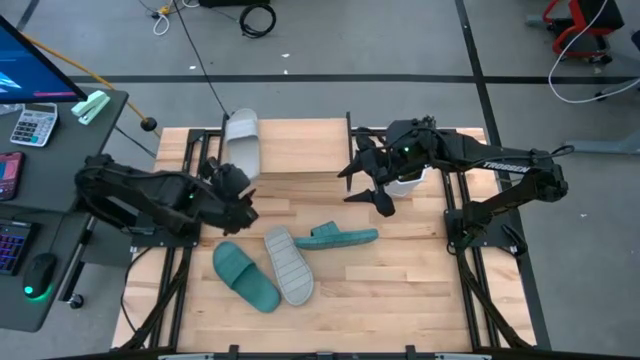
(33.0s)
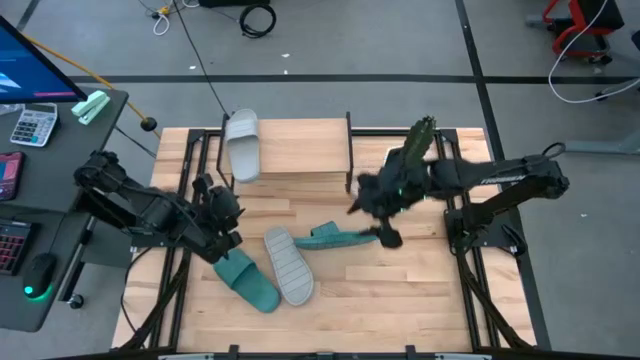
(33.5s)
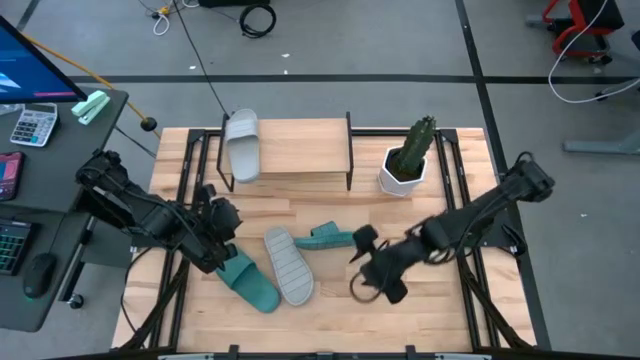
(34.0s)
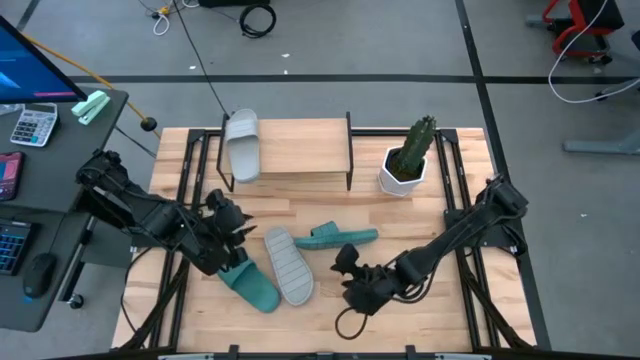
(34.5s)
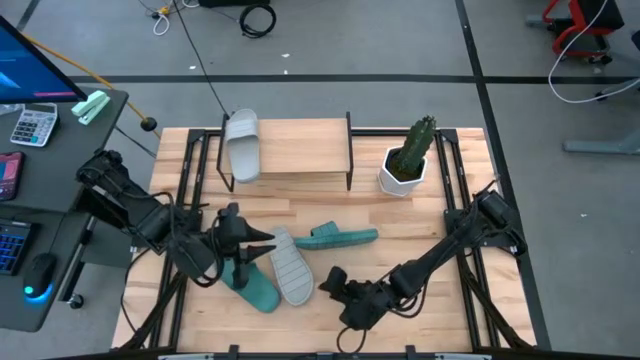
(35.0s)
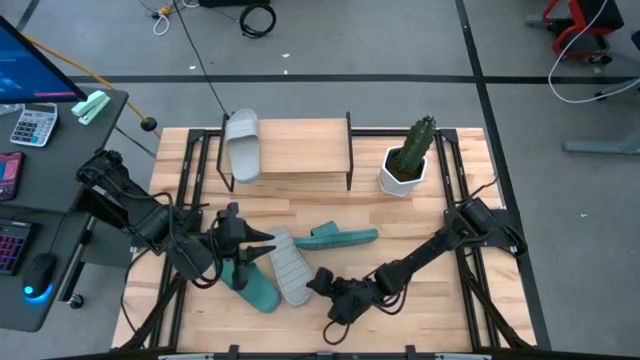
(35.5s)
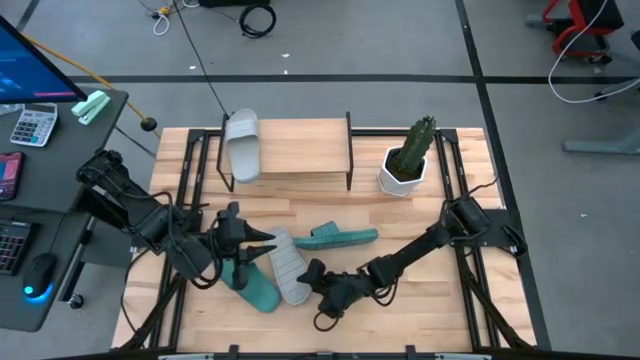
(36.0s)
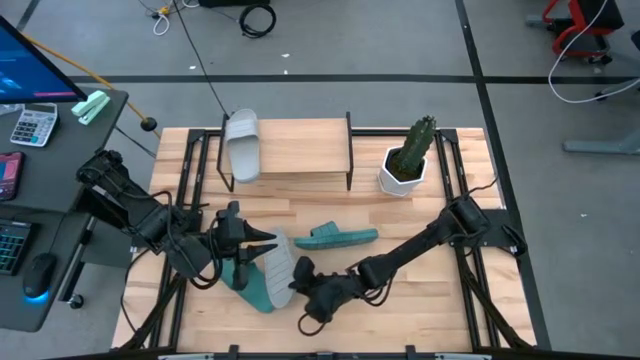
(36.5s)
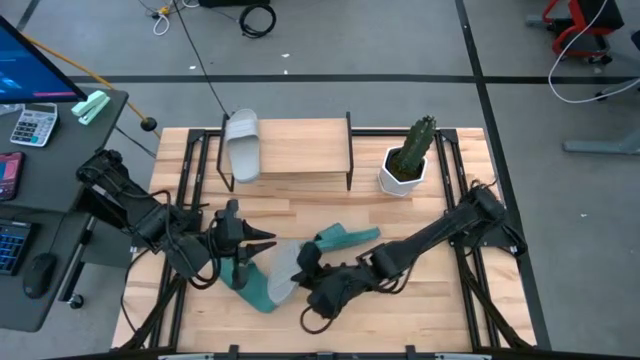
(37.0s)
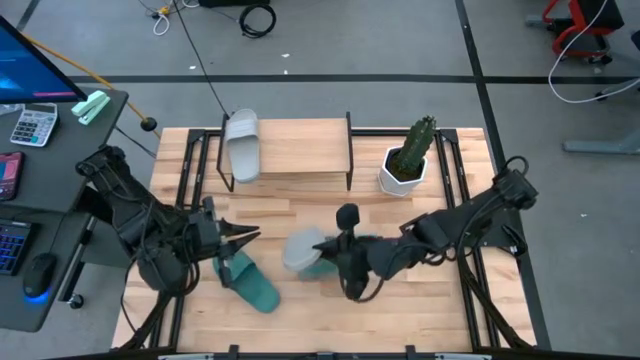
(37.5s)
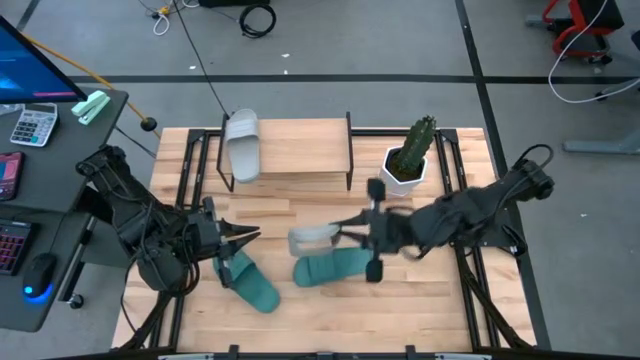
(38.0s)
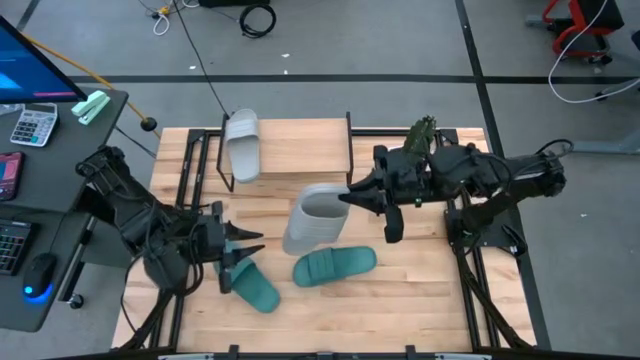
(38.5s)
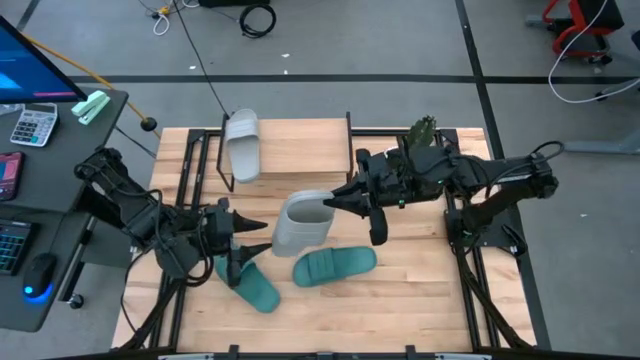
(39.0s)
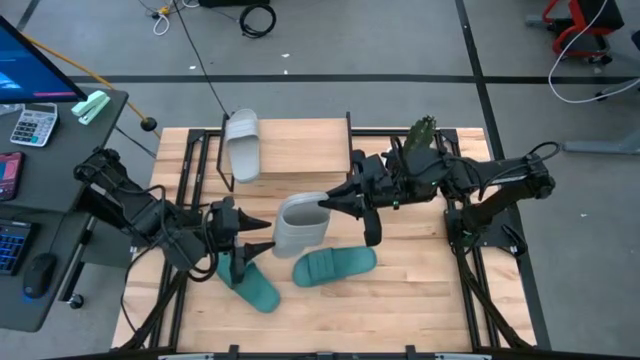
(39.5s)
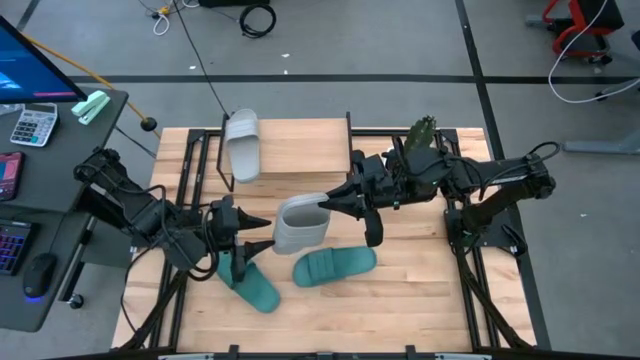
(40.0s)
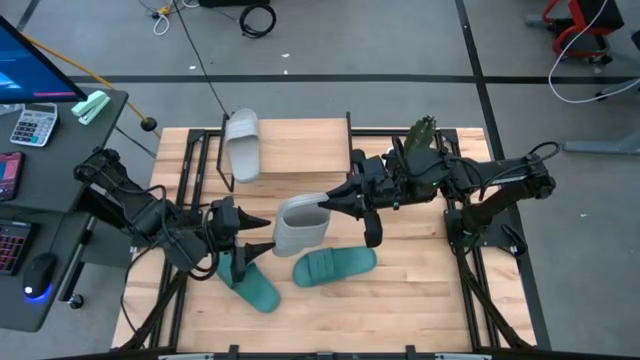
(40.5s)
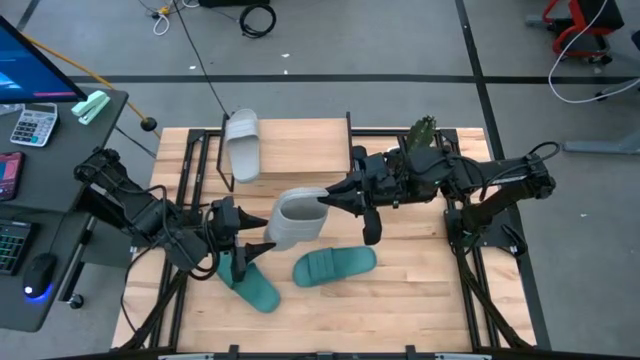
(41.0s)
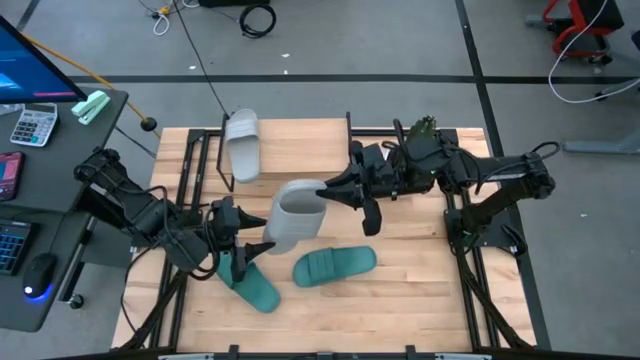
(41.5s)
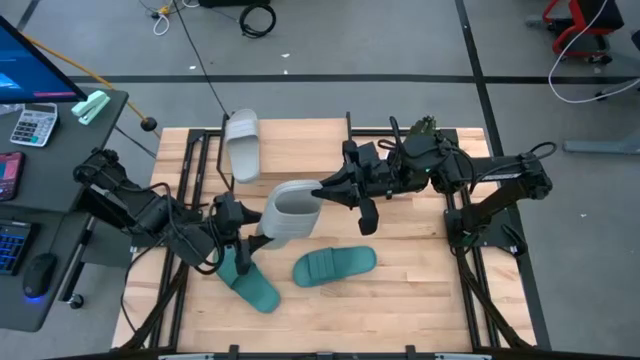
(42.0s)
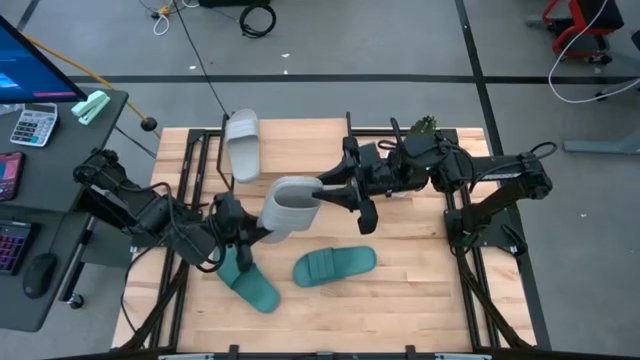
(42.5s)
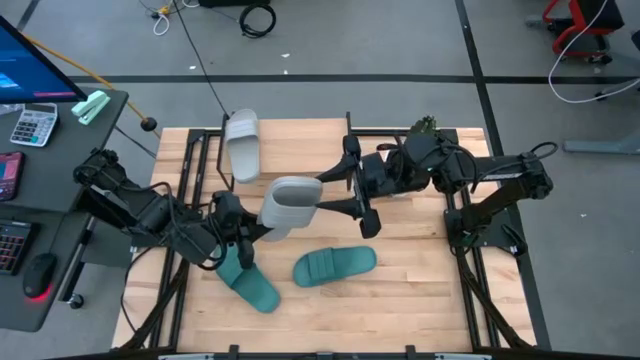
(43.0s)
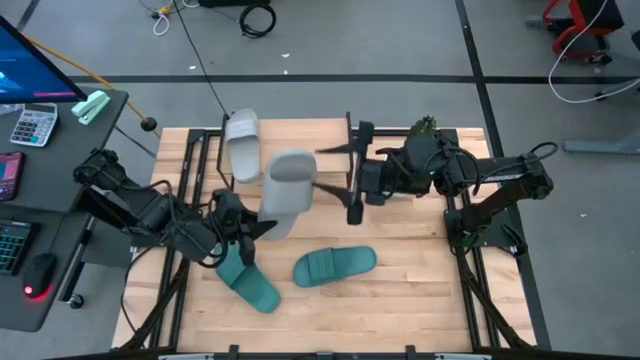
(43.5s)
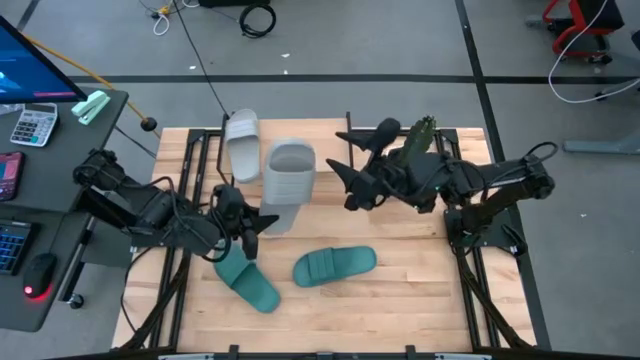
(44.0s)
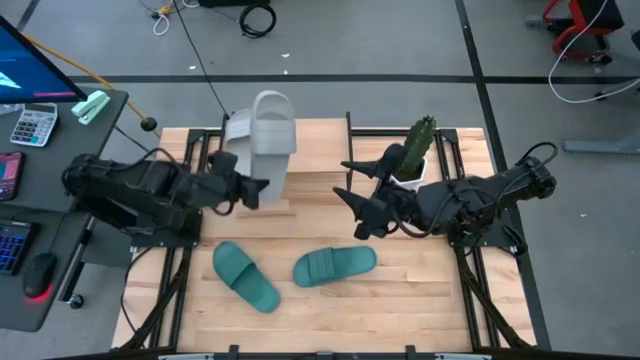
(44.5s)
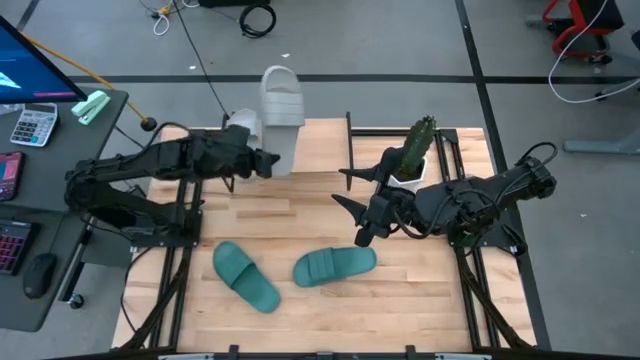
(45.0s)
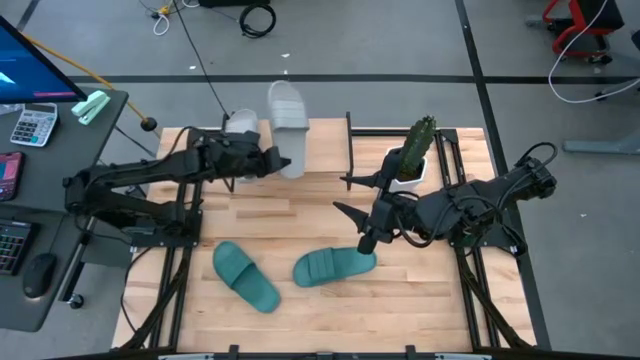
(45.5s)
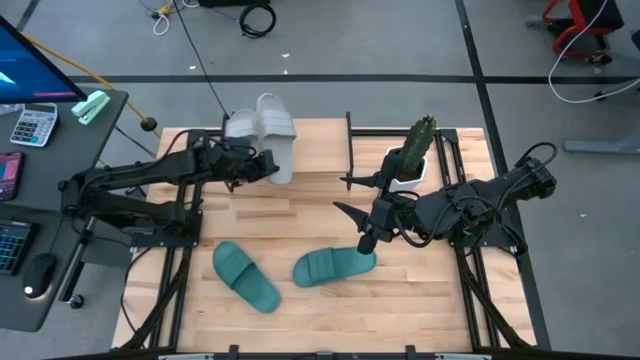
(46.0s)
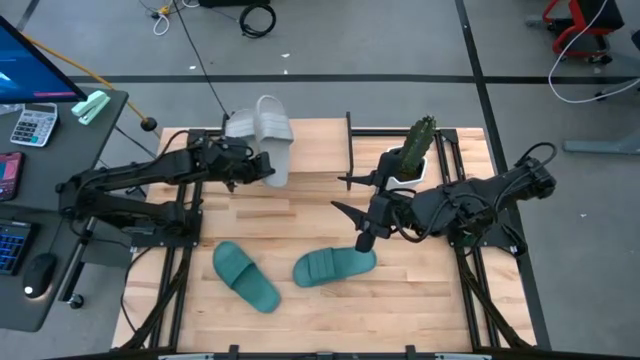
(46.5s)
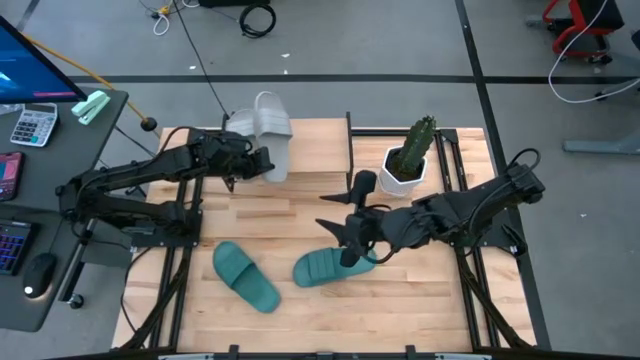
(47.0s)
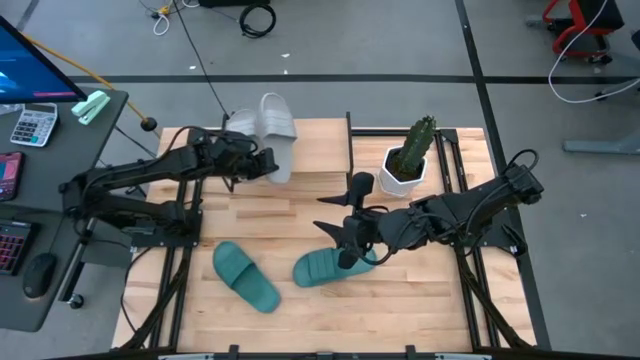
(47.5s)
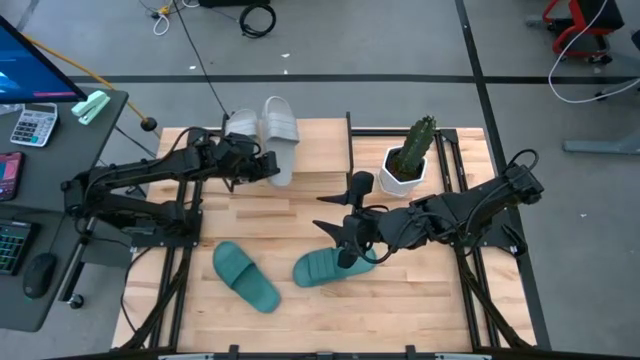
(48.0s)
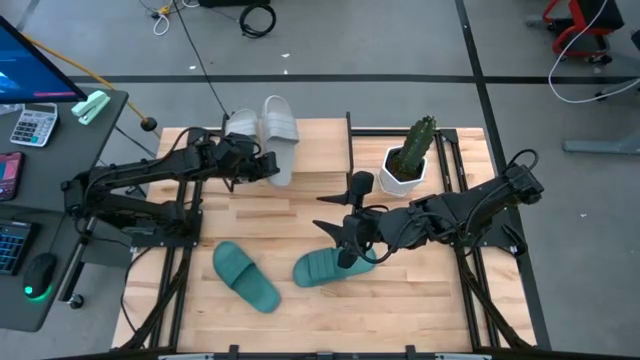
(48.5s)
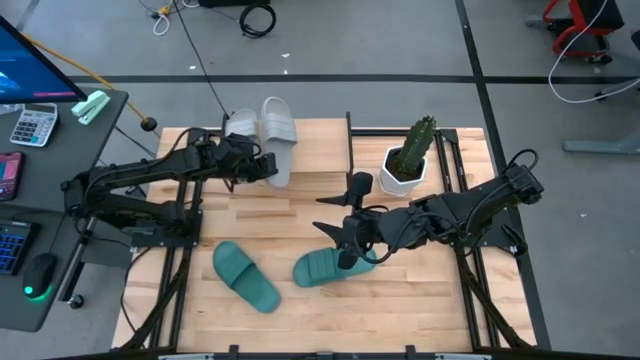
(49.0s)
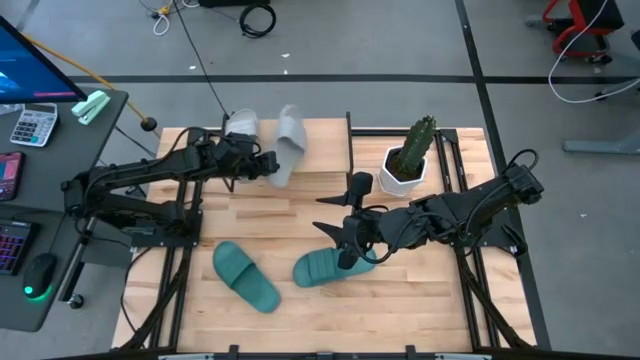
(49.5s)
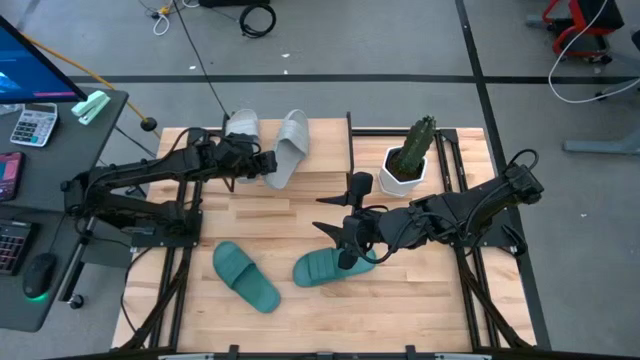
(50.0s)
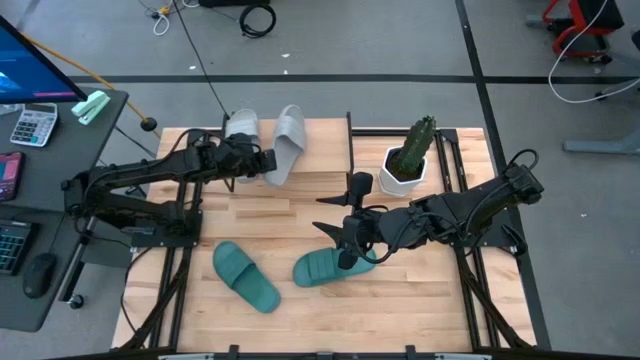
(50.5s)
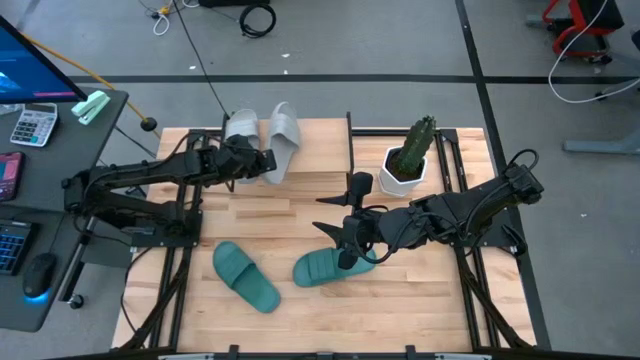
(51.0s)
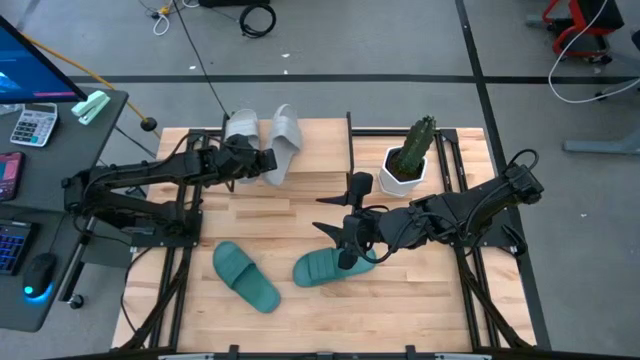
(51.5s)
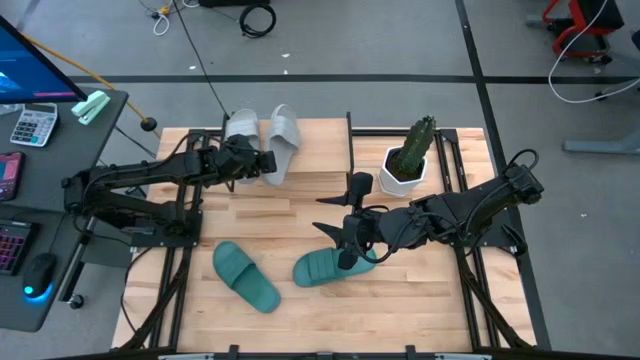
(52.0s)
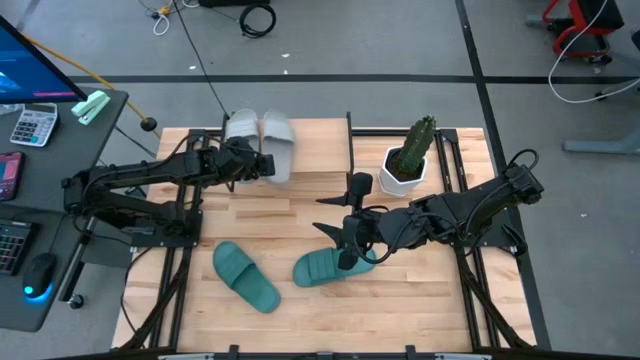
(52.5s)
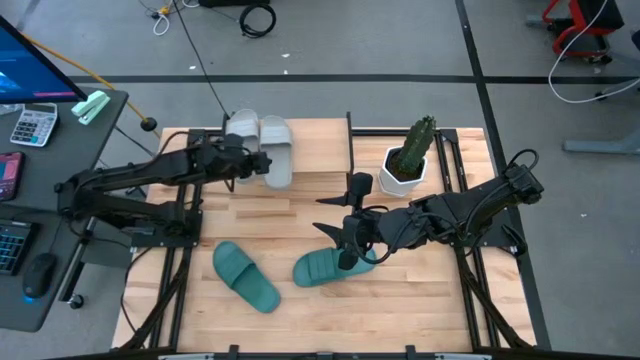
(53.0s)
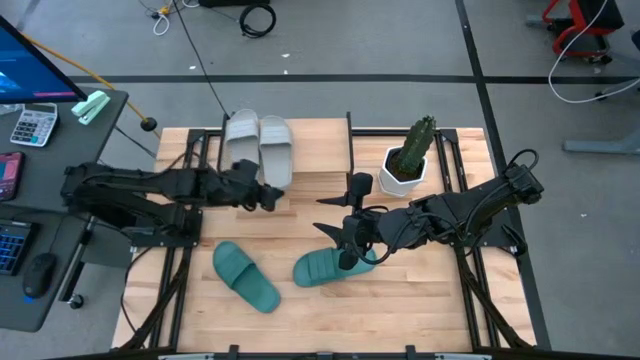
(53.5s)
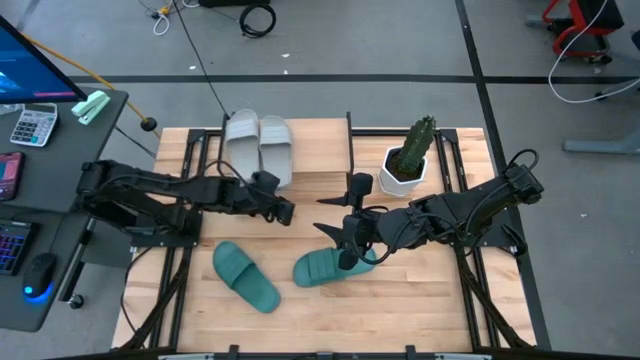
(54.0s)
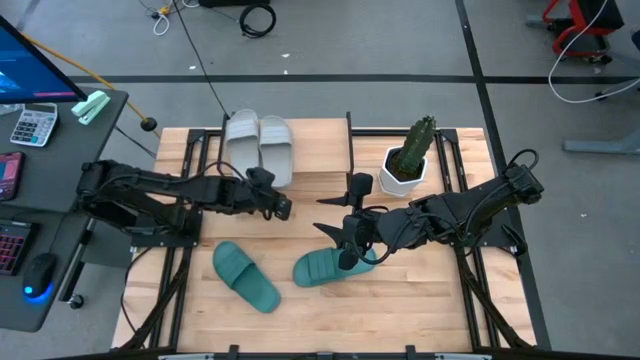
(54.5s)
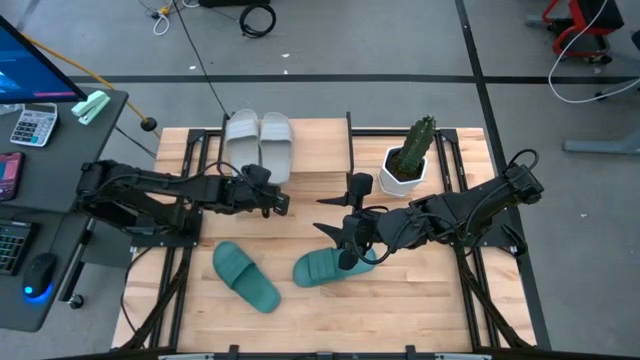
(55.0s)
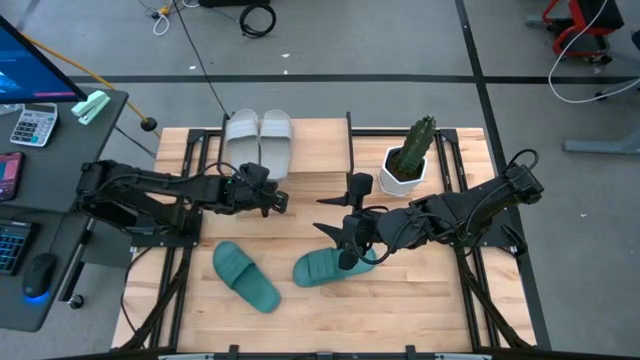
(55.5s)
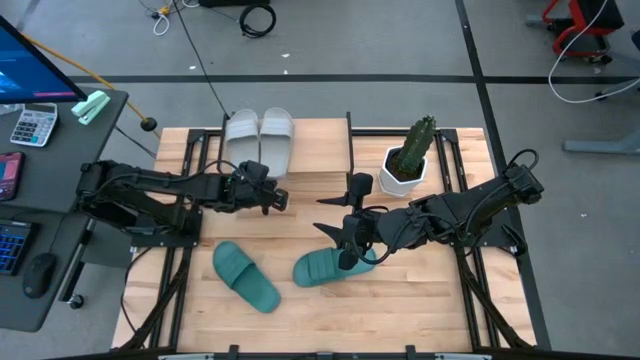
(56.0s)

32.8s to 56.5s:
Task: Pick and place slides into the shelf
Put the gray slipper on the shelf
